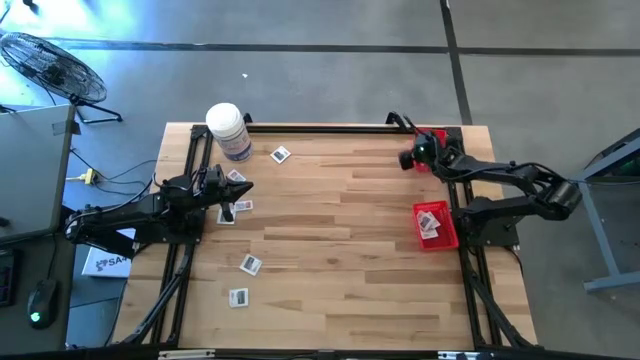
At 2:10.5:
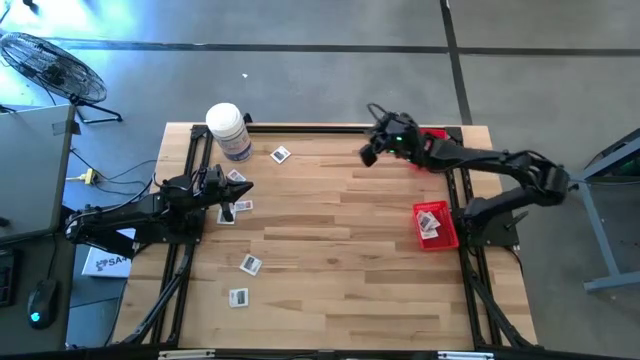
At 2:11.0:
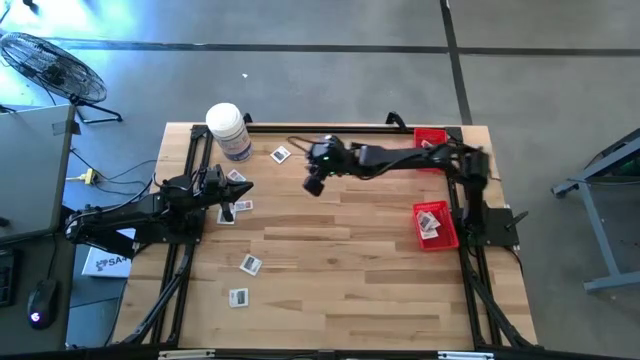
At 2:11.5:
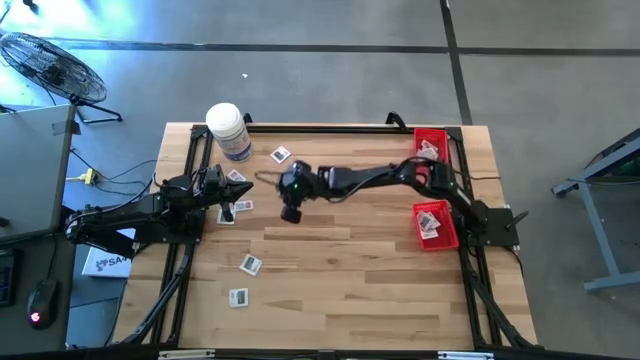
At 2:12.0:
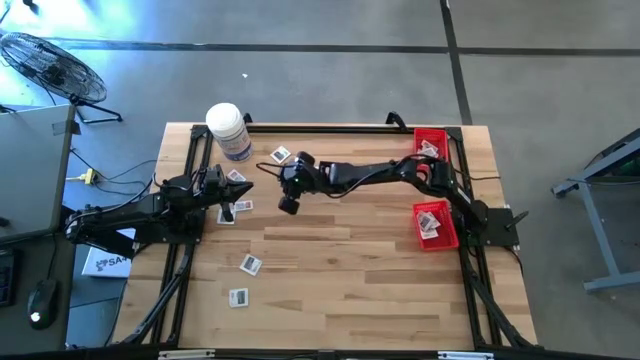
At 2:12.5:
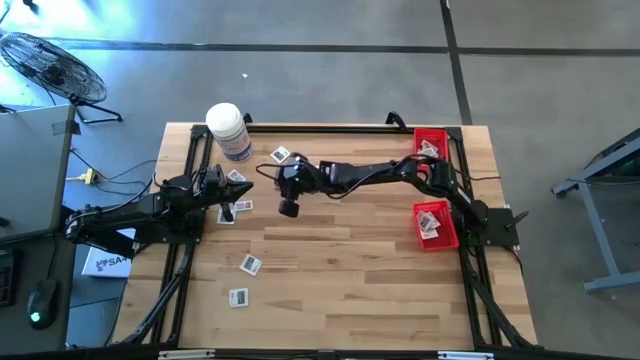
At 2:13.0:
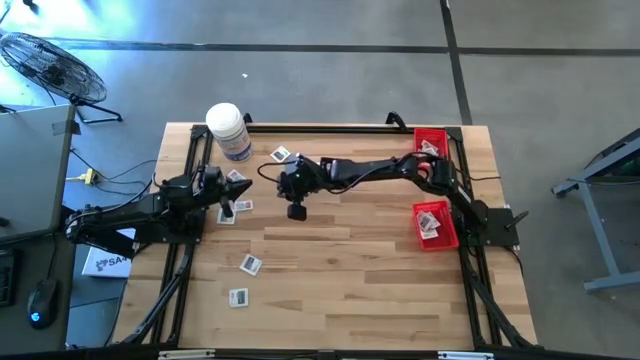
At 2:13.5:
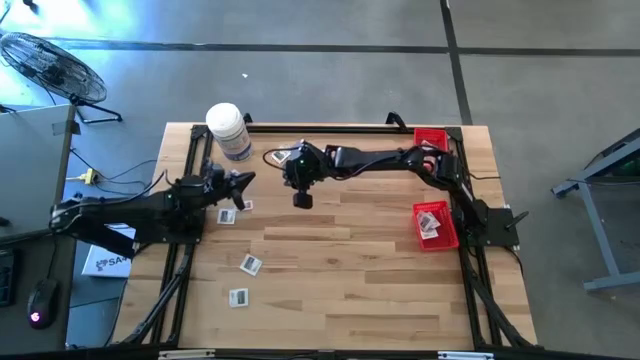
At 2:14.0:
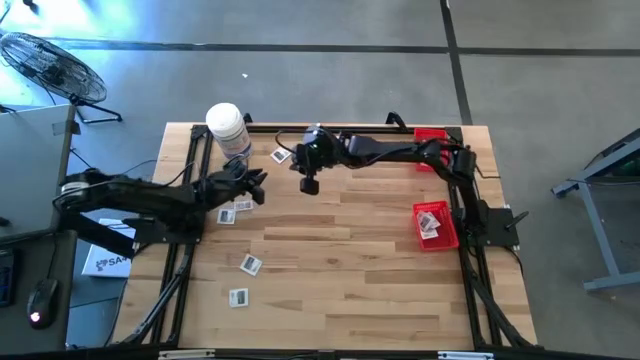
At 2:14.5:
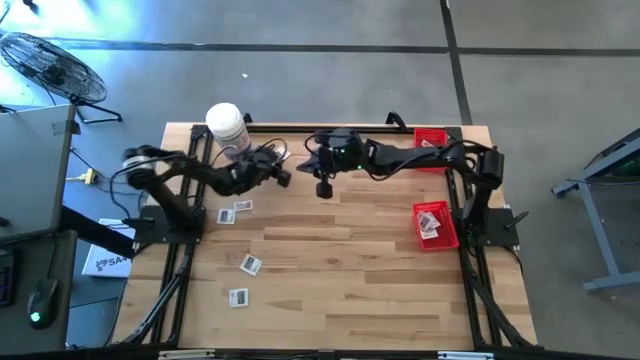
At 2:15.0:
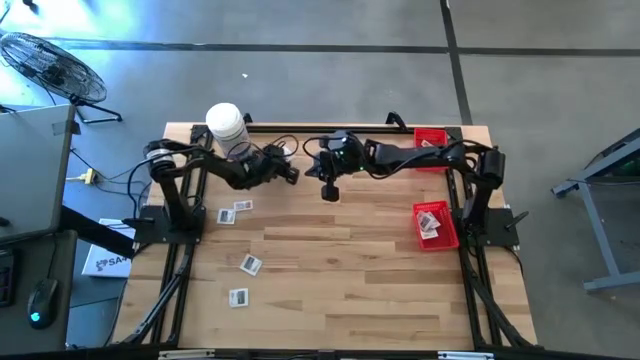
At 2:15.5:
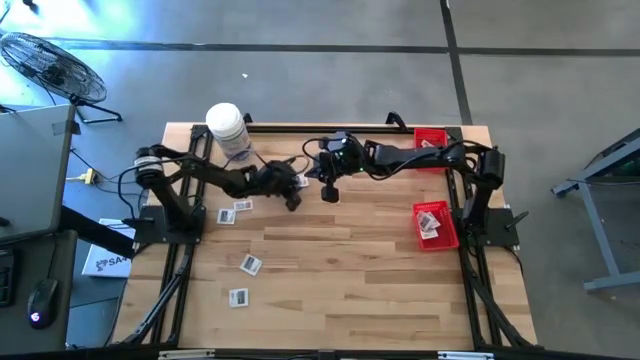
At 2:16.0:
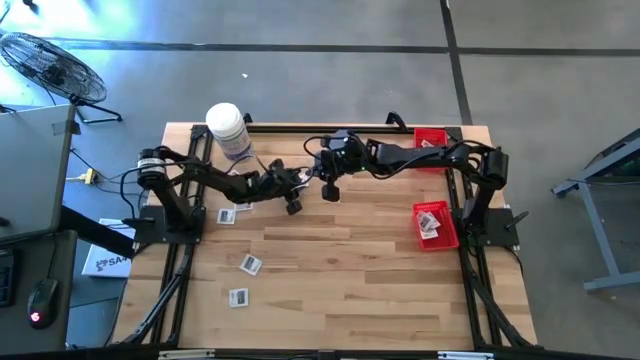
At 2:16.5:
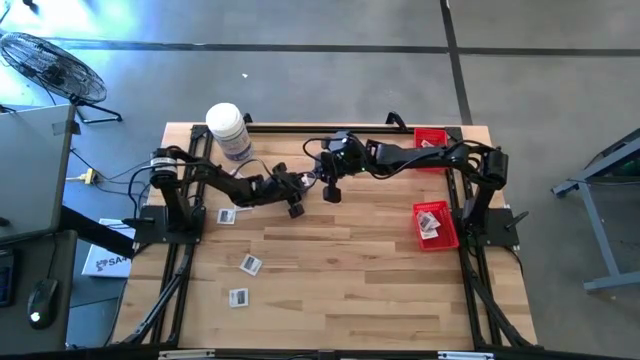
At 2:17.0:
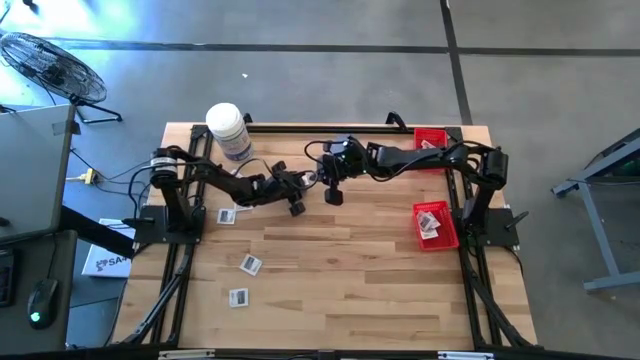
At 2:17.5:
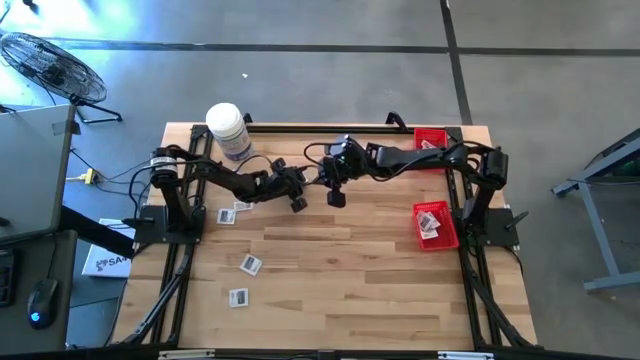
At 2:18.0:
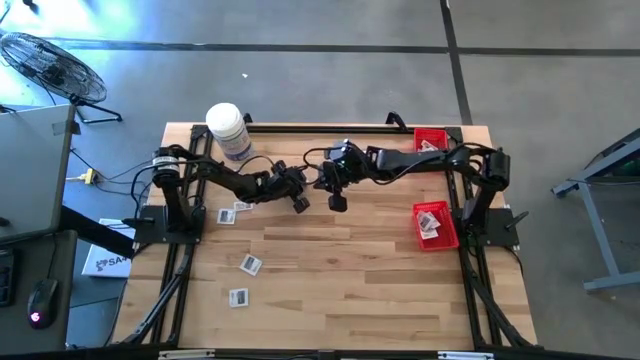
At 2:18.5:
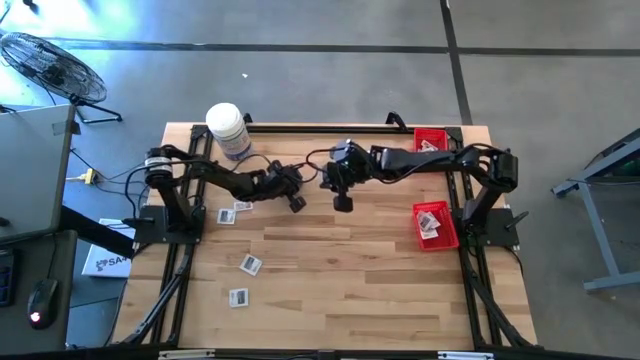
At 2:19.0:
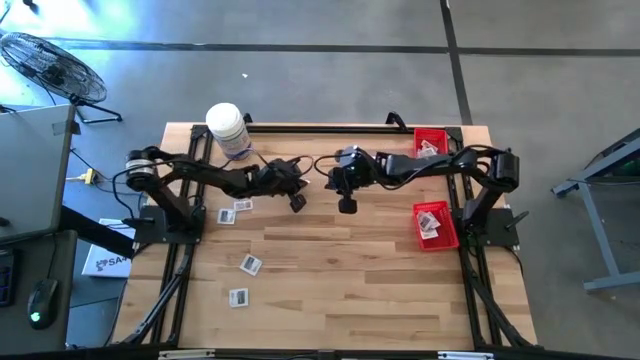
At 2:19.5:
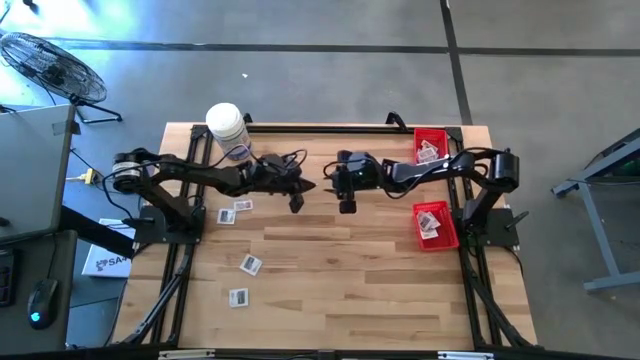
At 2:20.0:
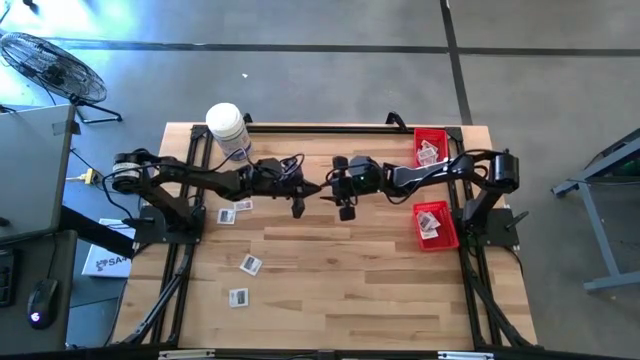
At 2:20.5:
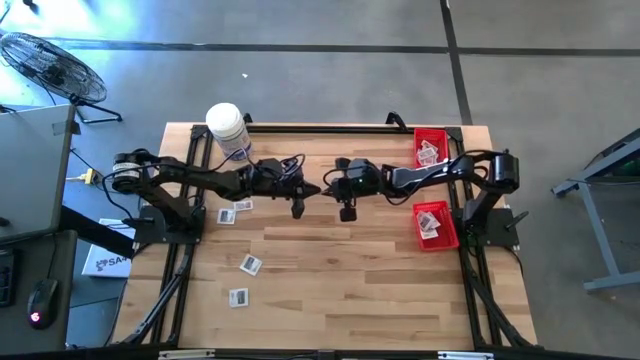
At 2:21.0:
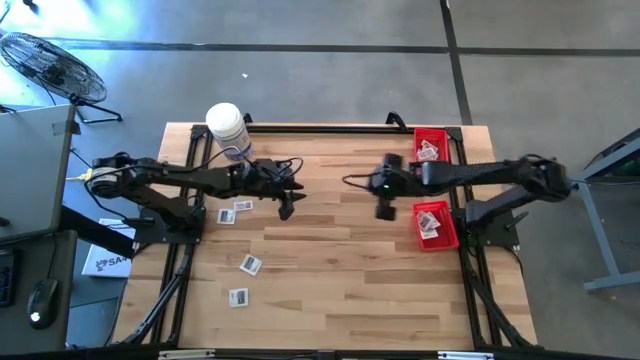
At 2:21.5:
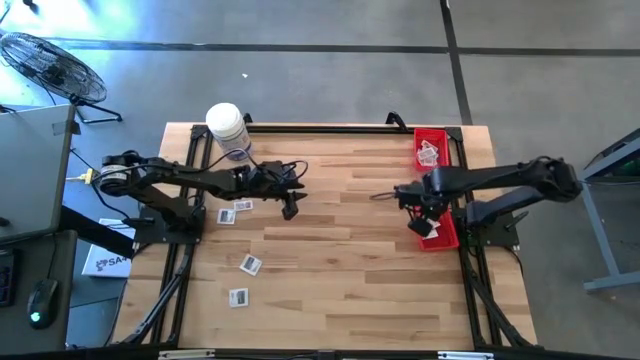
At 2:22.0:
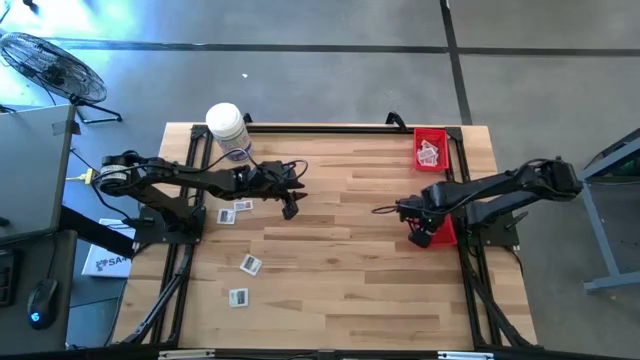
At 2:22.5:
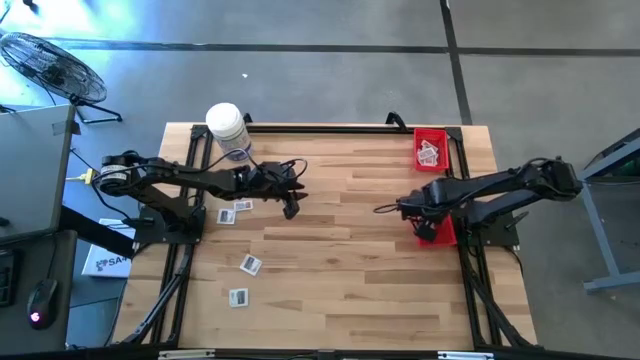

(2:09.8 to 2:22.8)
Task: Pick & Place First Aid Supplies
Put the towelette pack into the bottom basket

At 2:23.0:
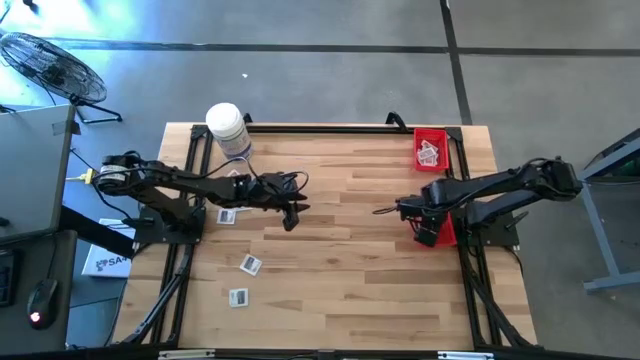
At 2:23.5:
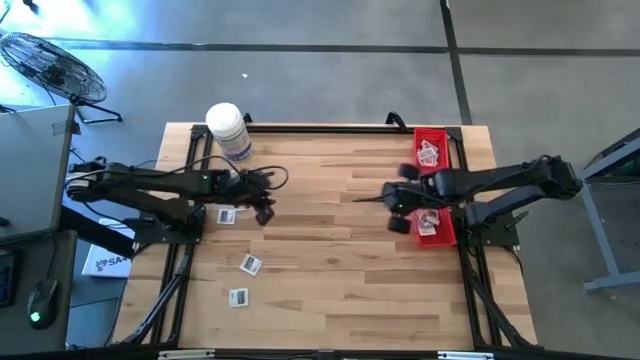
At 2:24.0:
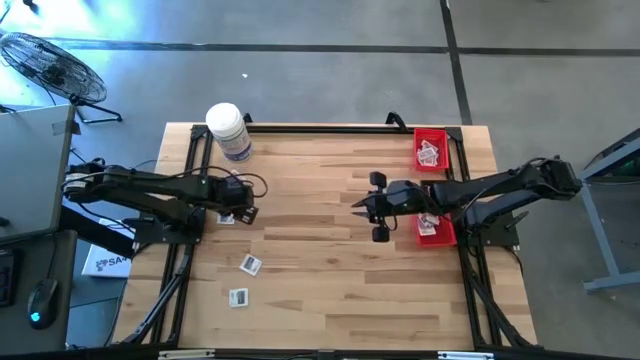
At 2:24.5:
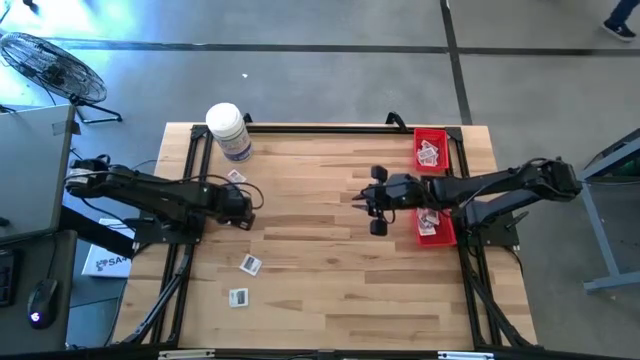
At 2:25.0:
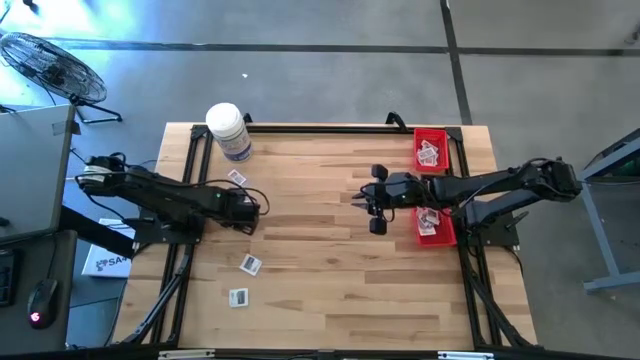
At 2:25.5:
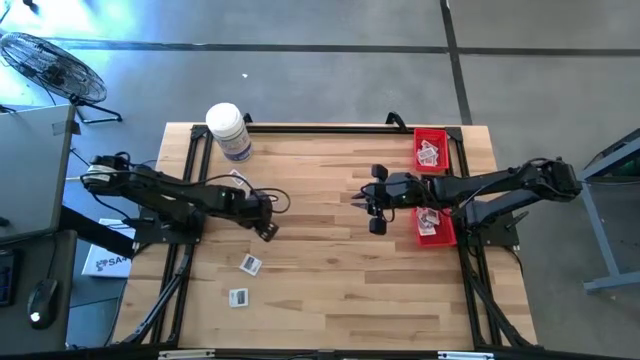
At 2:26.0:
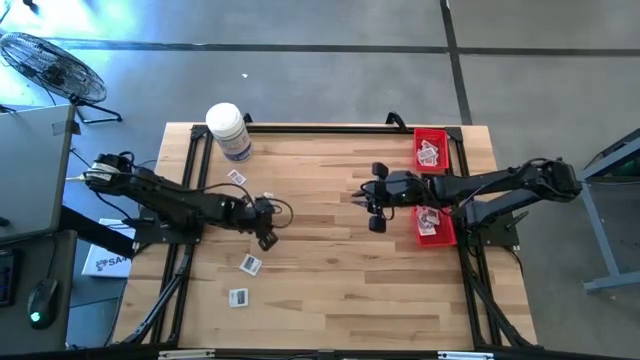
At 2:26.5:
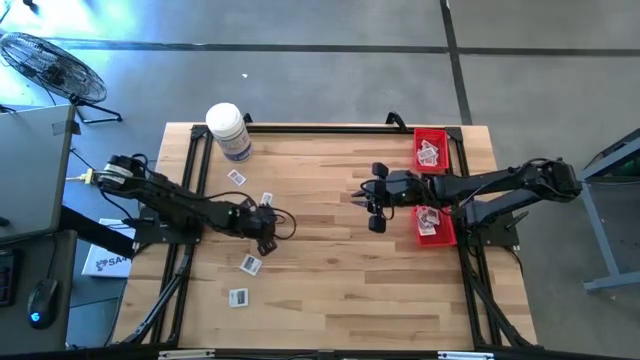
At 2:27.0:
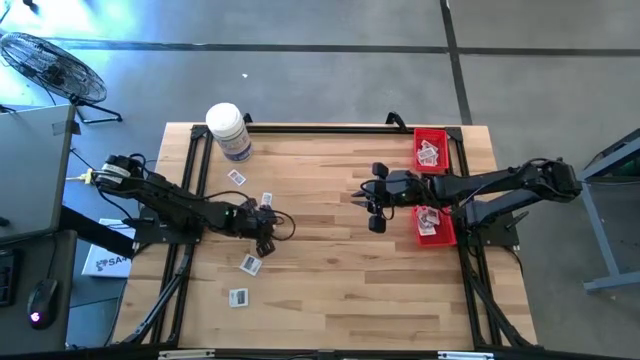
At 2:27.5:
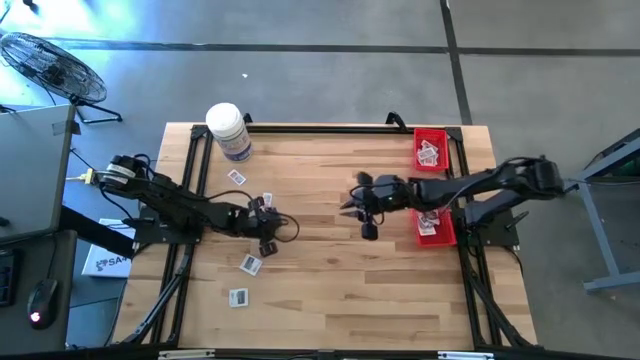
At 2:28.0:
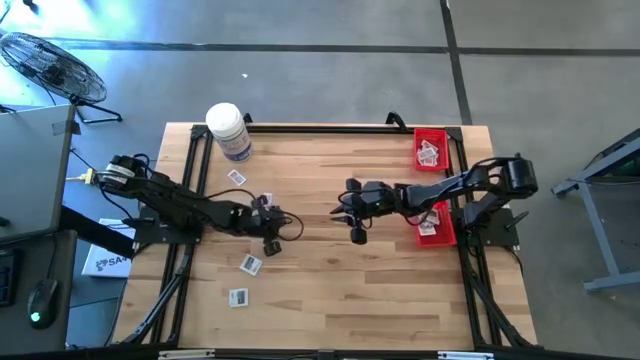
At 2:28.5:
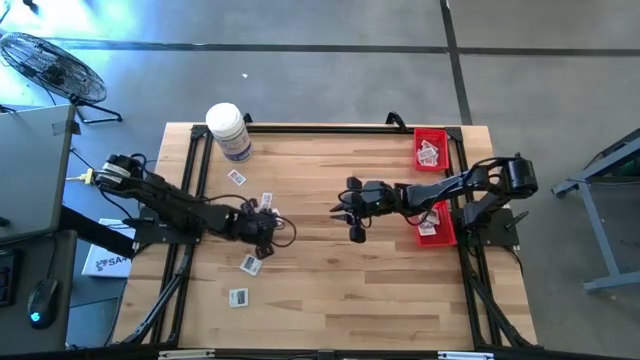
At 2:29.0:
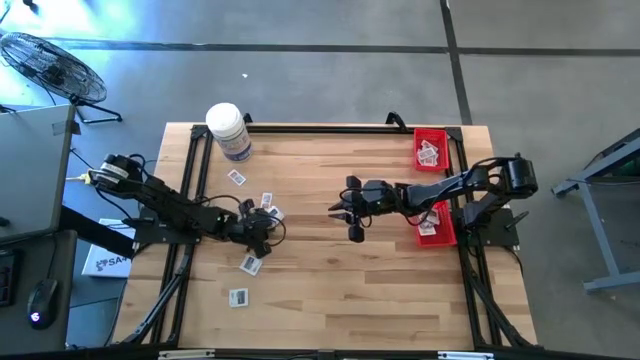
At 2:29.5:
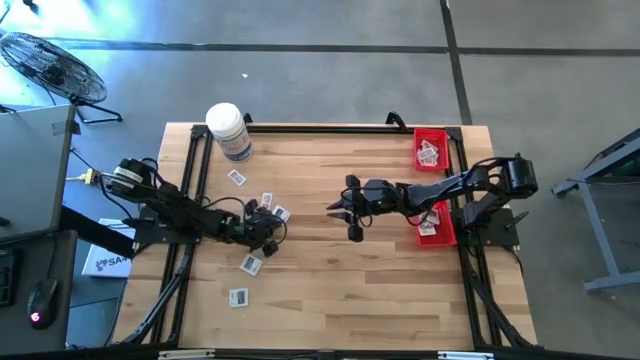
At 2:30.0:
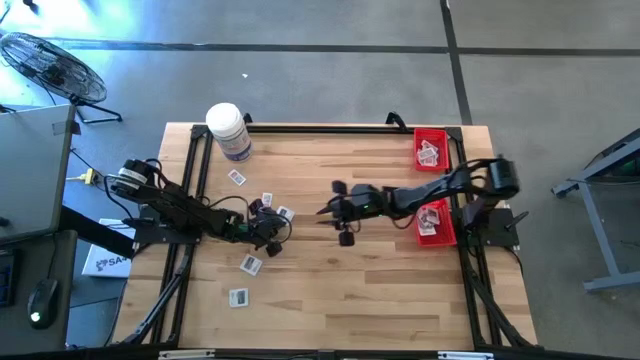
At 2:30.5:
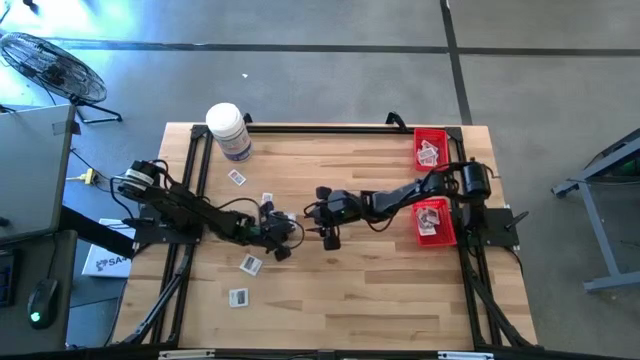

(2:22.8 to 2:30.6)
Put the towelette pack into the bottom basket
